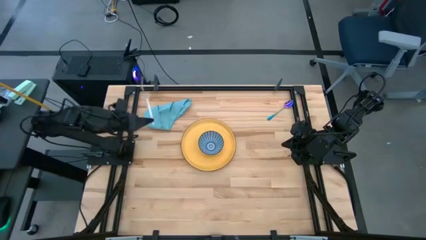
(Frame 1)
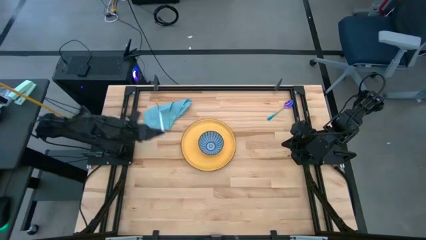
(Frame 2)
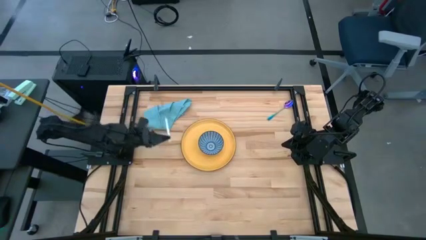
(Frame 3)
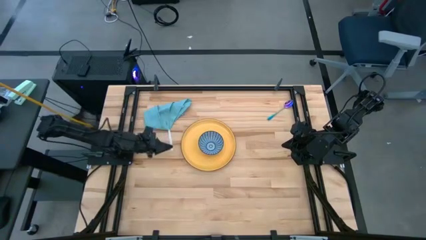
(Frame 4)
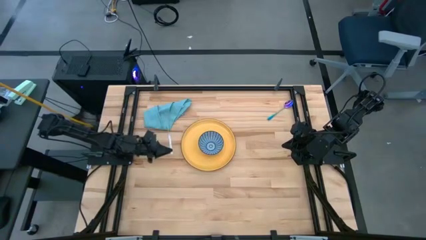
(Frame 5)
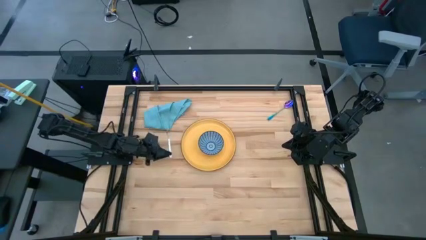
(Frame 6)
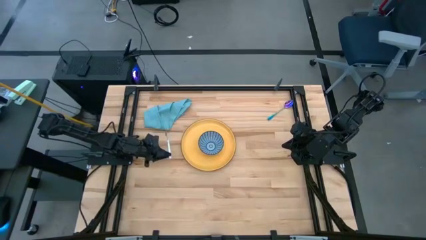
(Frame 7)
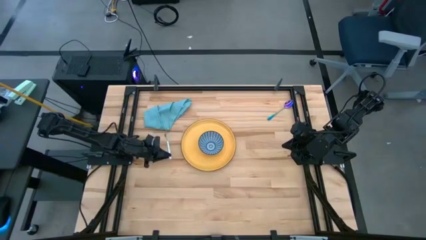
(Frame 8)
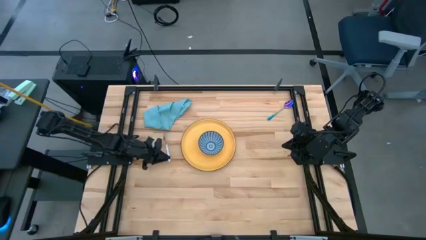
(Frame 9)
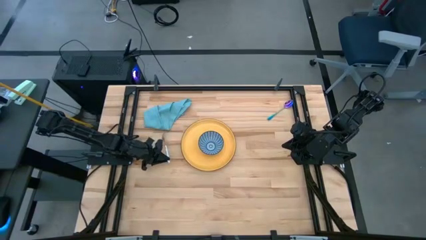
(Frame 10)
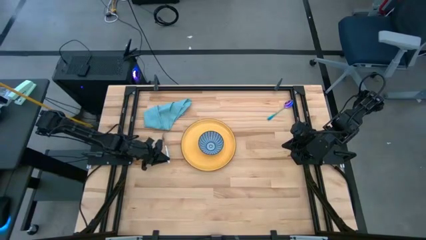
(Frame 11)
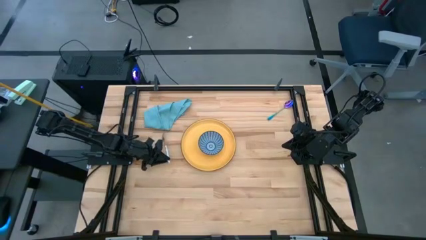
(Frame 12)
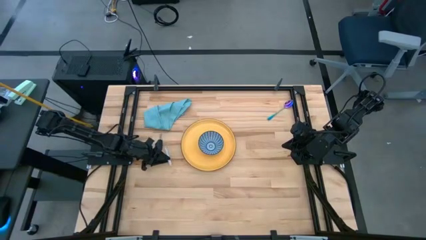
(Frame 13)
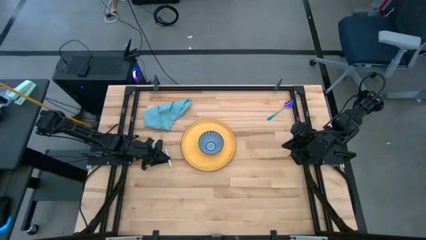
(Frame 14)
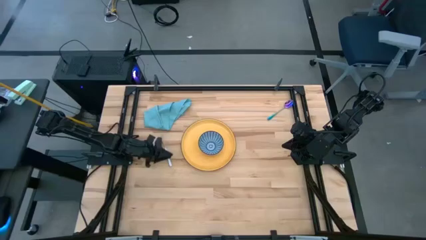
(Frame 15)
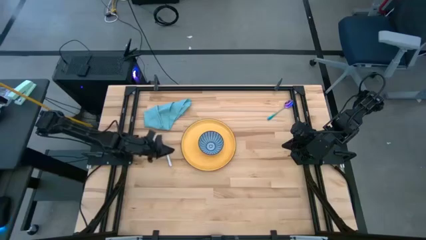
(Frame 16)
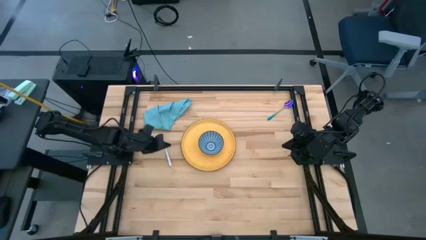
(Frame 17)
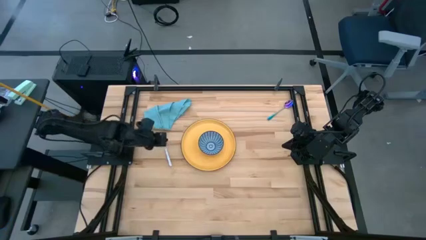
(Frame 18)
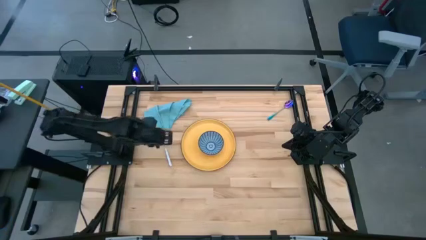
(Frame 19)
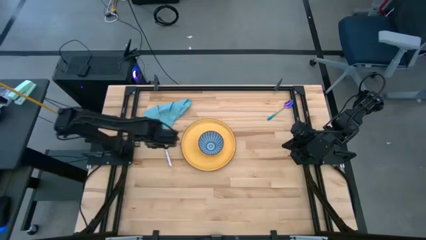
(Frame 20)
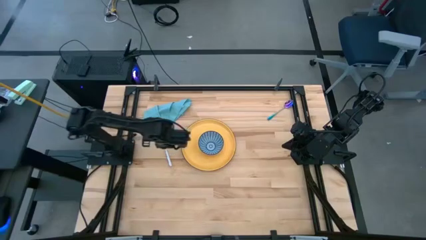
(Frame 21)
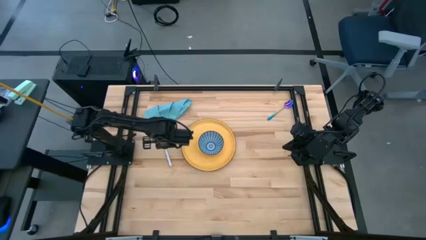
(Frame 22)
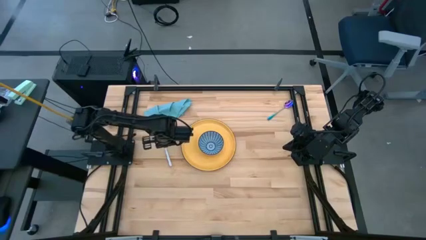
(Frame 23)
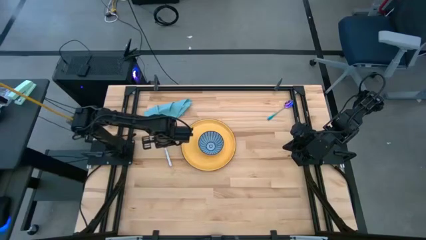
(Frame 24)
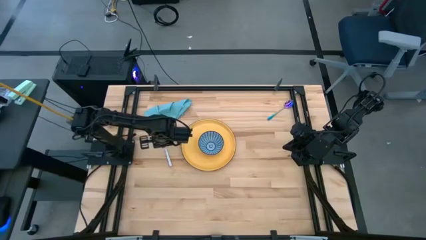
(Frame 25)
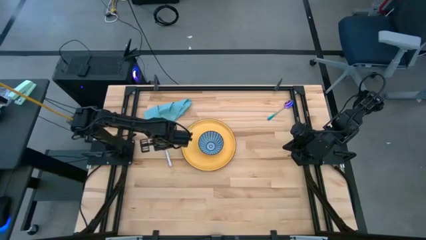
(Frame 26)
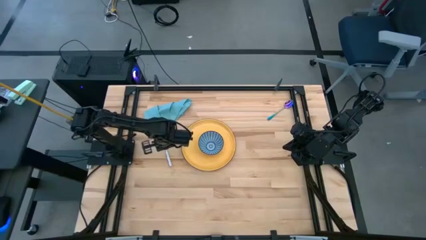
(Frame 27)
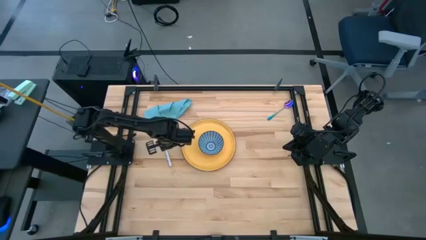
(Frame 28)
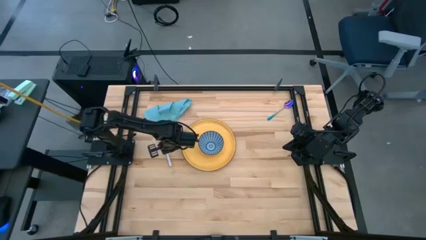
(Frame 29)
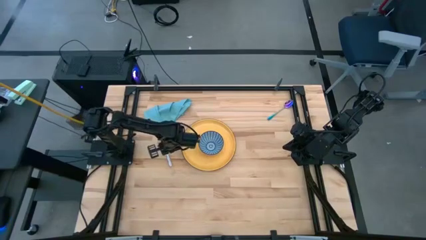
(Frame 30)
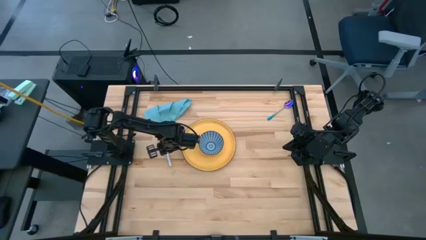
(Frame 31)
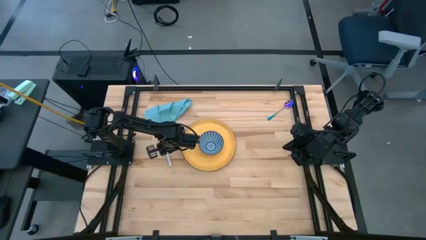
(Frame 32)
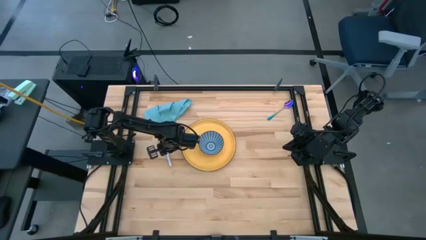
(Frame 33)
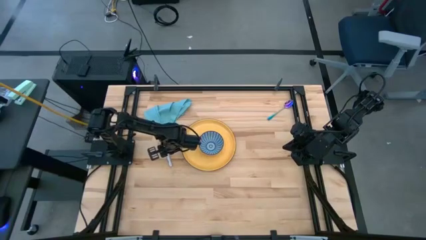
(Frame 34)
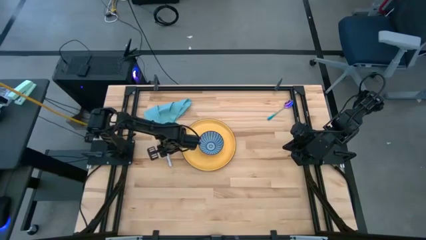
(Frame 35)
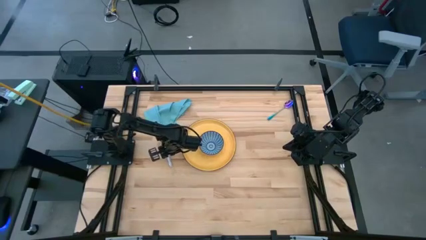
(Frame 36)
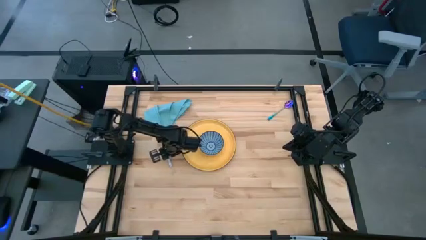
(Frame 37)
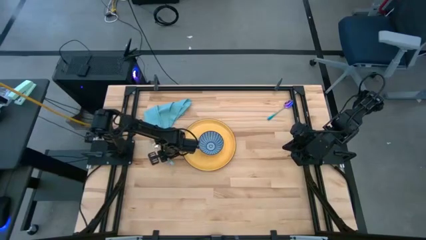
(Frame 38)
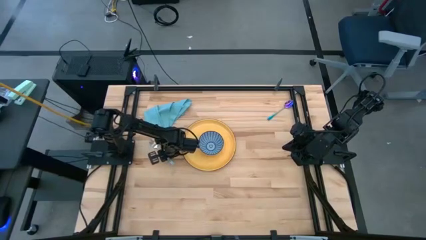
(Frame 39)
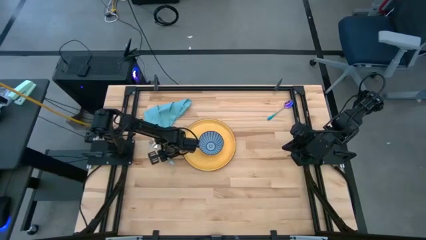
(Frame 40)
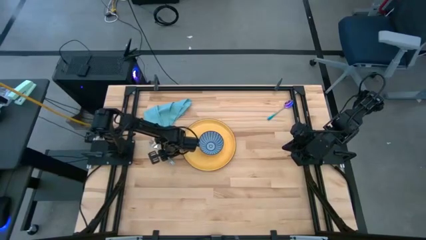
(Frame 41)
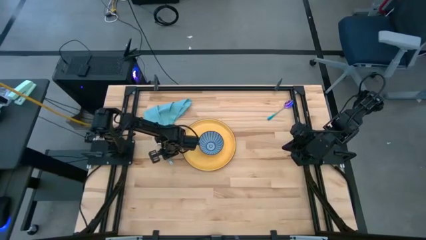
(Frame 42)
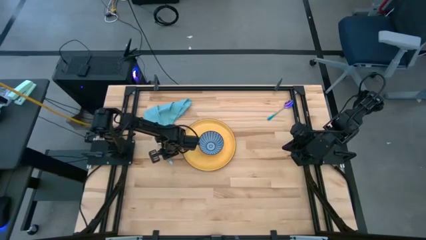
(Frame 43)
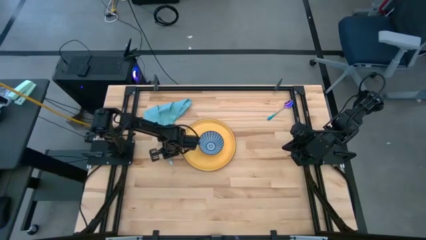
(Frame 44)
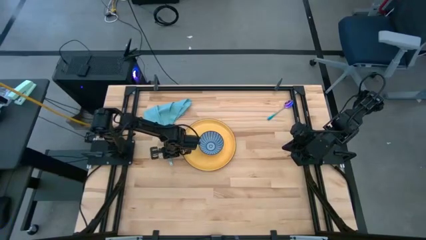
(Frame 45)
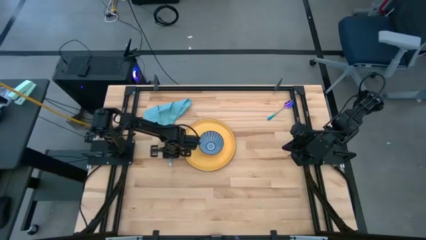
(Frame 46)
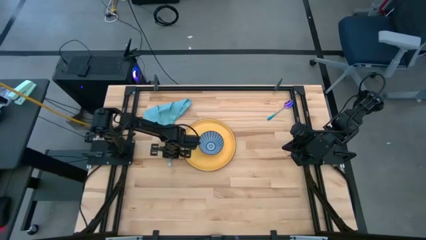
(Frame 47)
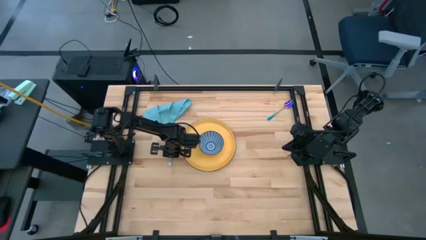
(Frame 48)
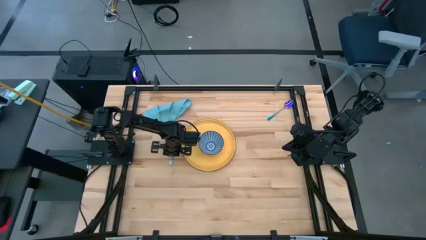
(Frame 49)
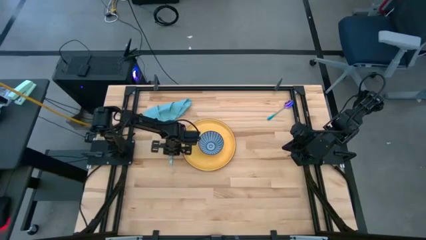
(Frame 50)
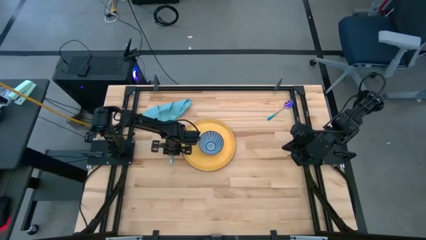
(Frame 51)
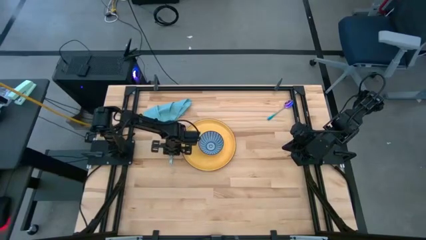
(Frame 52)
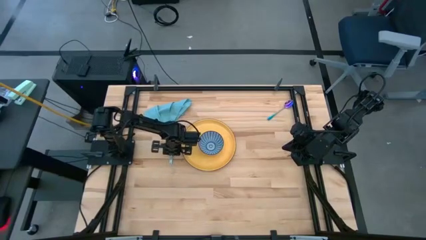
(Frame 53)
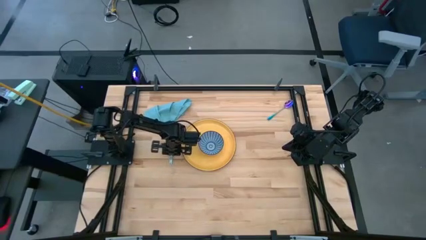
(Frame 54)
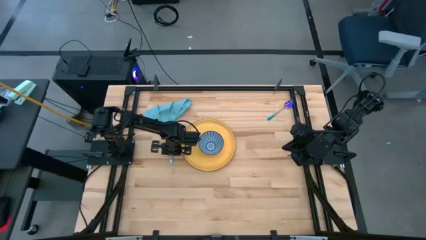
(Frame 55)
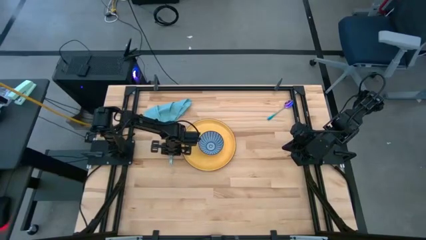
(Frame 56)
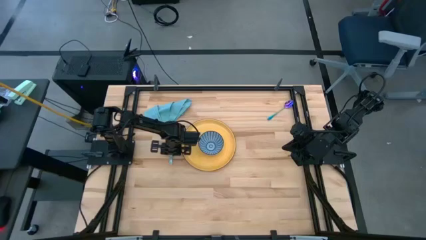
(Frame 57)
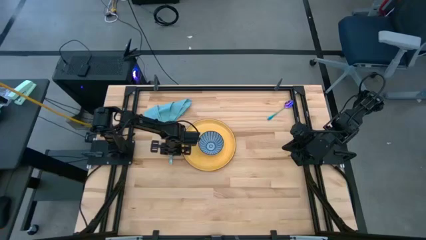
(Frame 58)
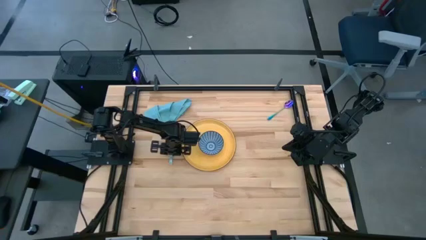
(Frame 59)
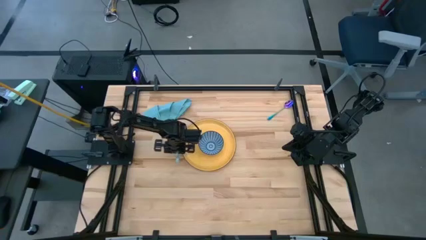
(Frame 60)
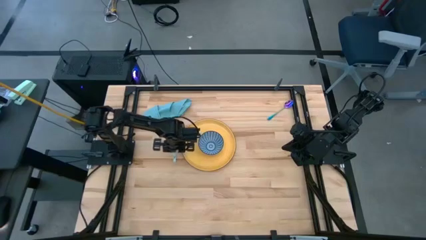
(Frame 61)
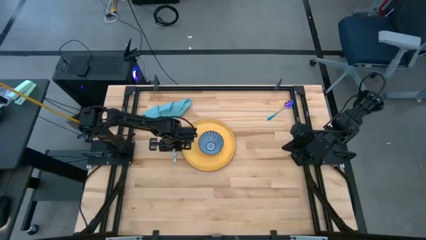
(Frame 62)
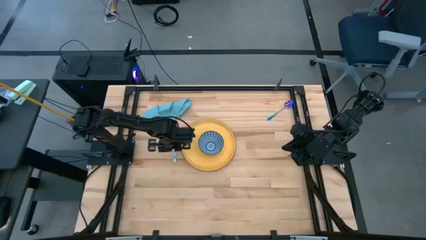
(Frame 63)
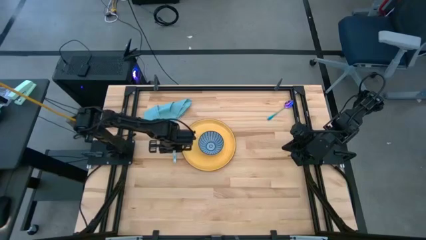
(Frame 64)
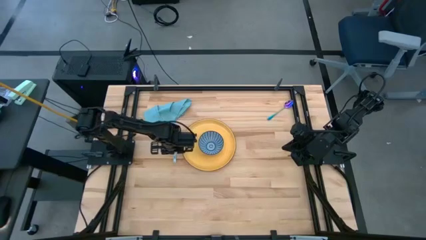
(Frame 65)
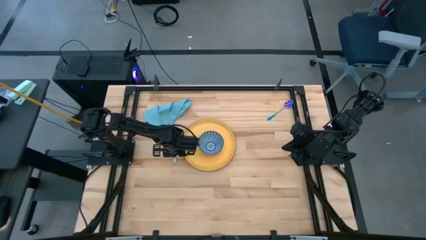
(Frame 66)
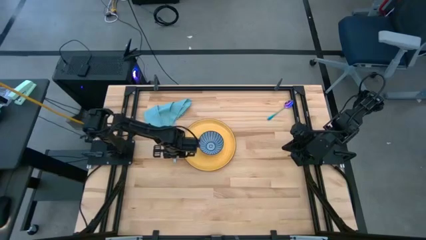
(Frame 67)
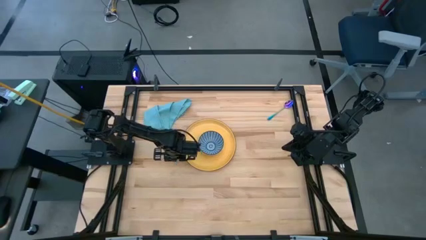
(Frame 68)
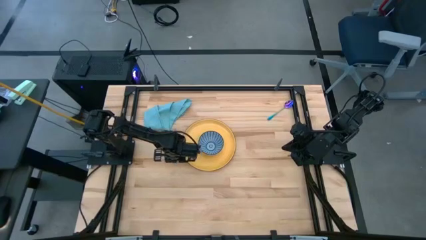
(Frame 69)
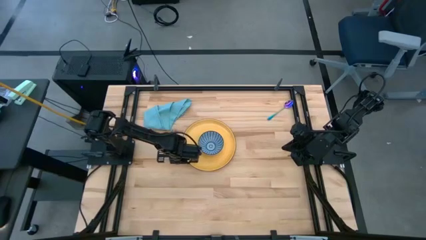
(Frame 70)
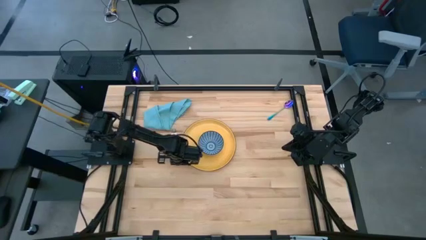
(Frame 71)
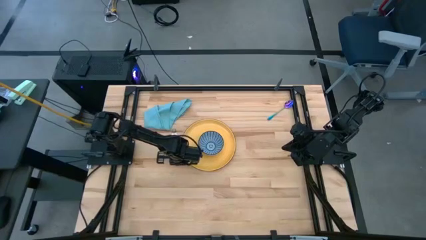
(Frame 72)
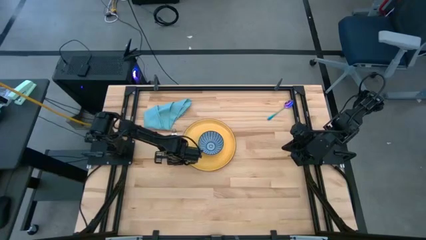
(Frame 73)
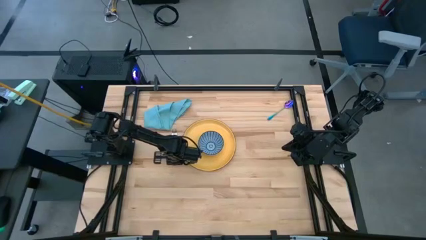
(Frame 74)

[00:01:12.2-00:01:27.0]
Task: Set table place
Put the blue fork to the left of the yellow plate
